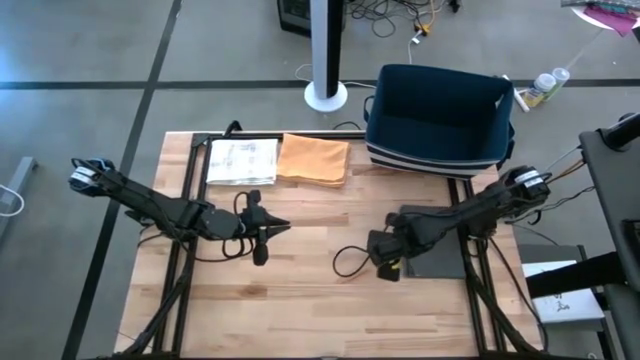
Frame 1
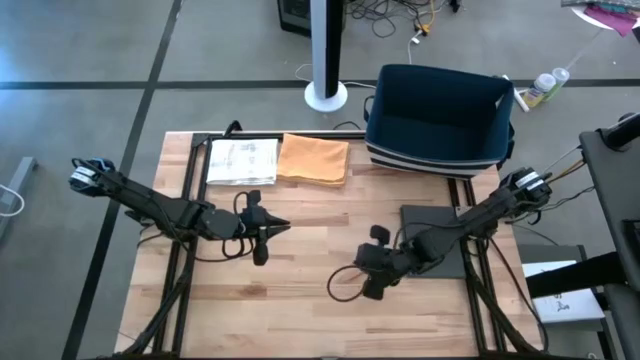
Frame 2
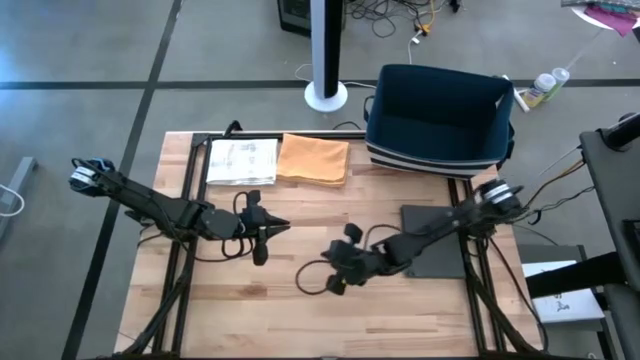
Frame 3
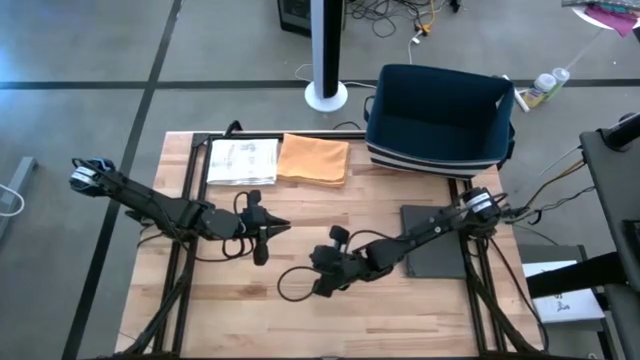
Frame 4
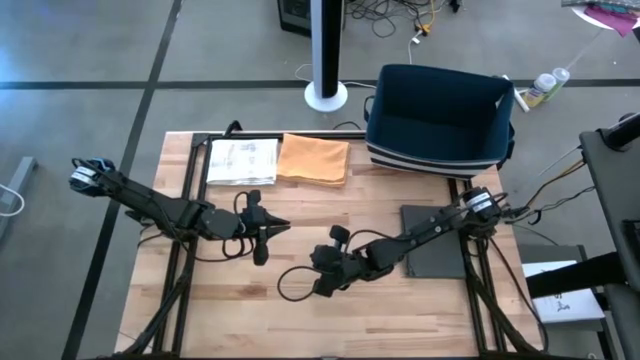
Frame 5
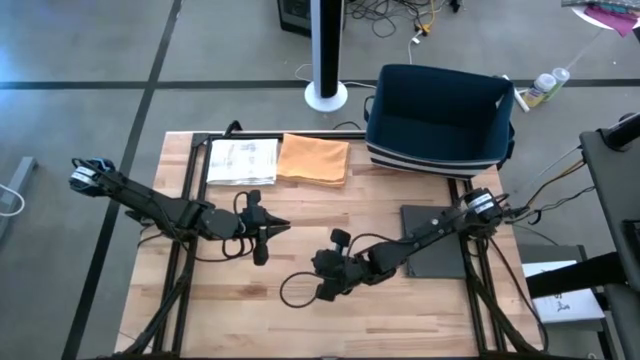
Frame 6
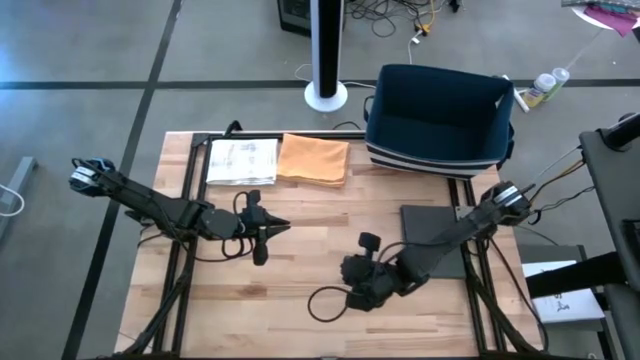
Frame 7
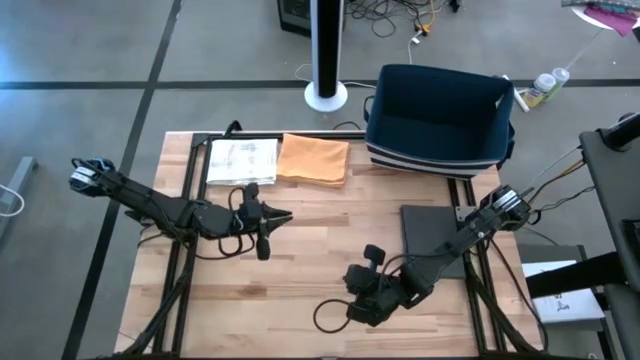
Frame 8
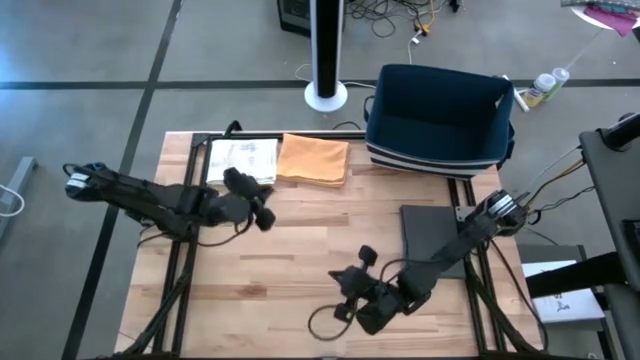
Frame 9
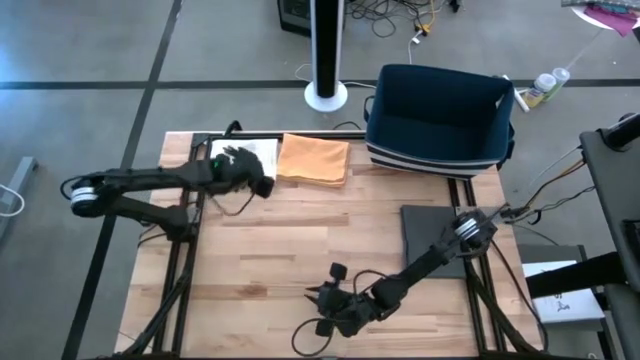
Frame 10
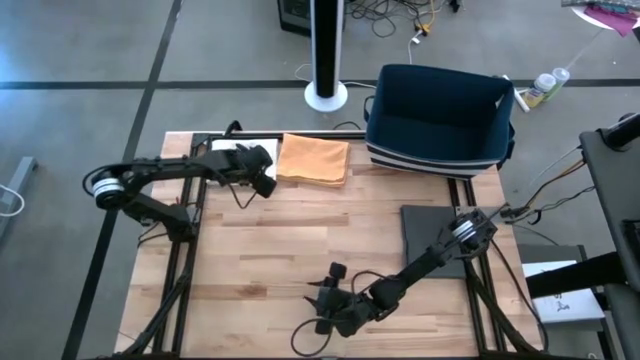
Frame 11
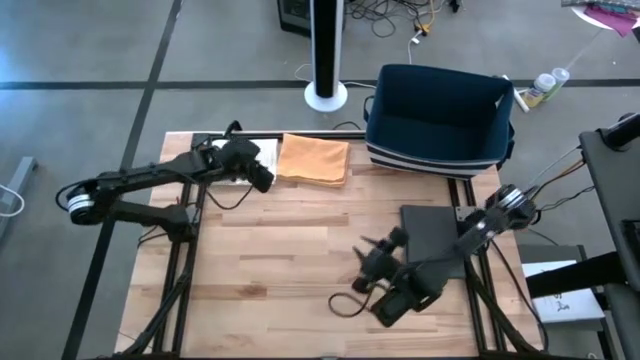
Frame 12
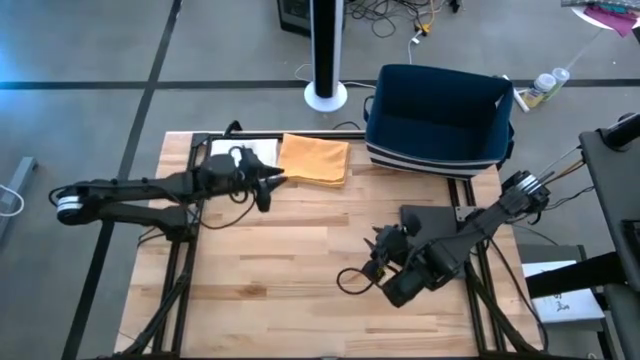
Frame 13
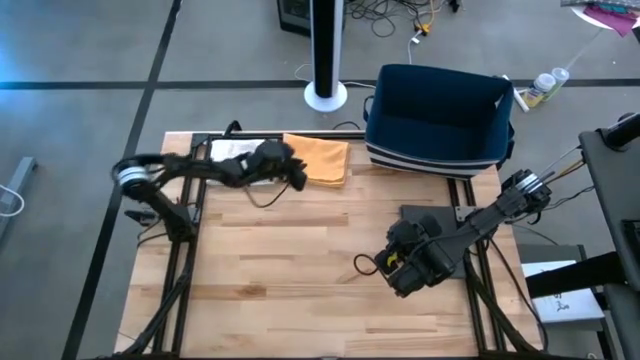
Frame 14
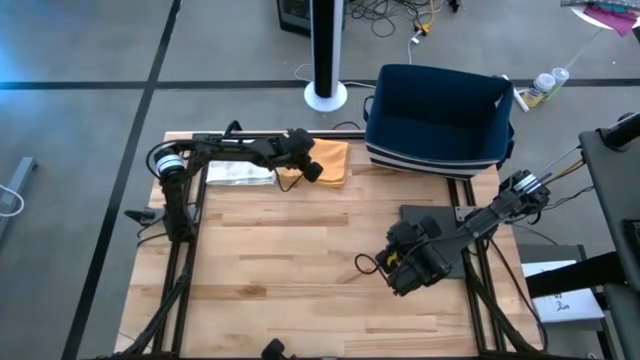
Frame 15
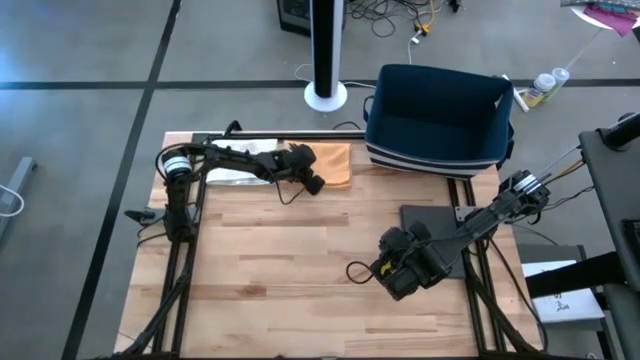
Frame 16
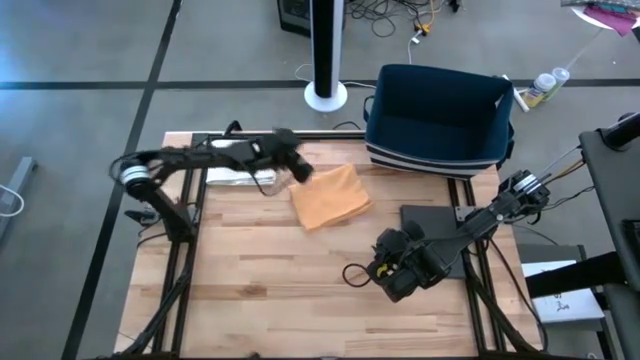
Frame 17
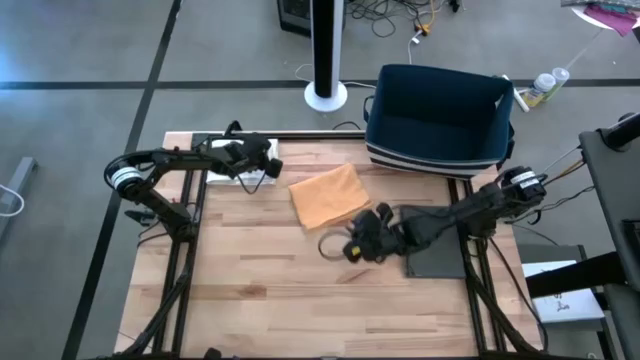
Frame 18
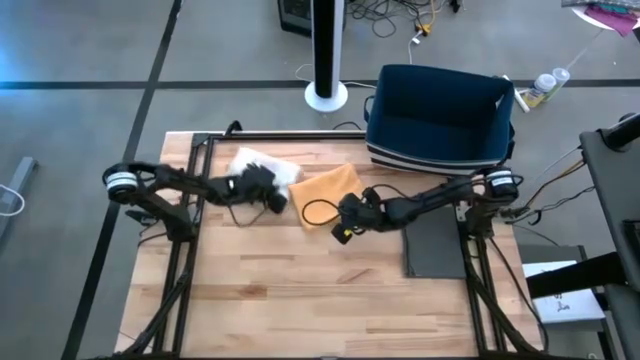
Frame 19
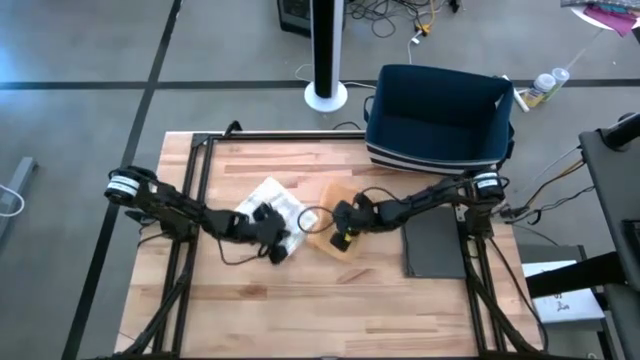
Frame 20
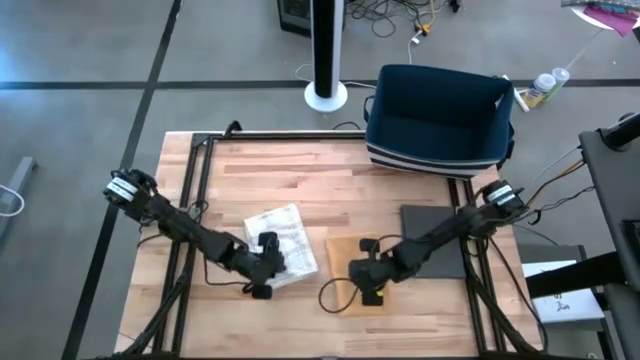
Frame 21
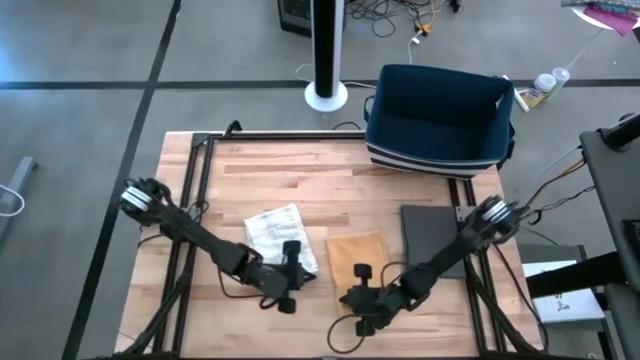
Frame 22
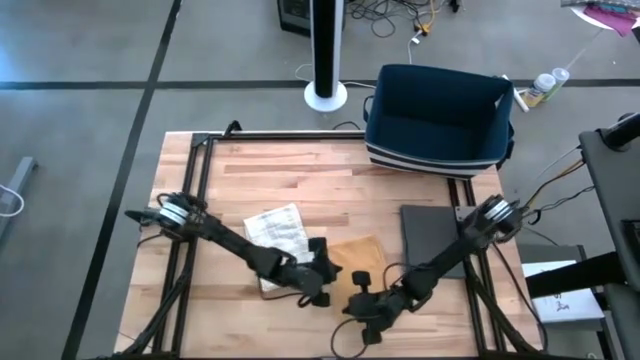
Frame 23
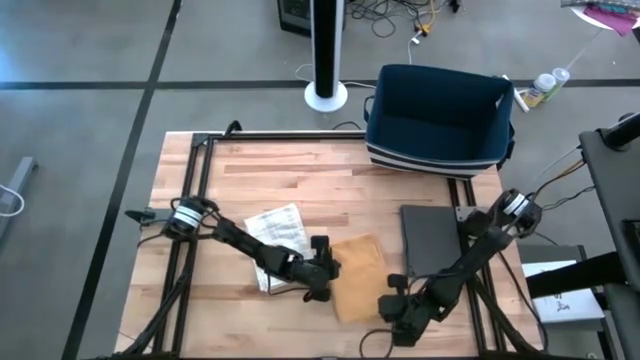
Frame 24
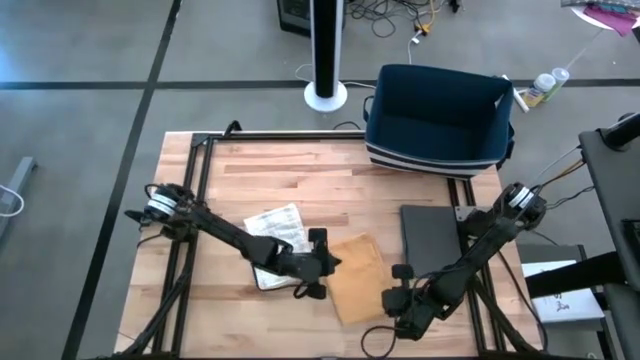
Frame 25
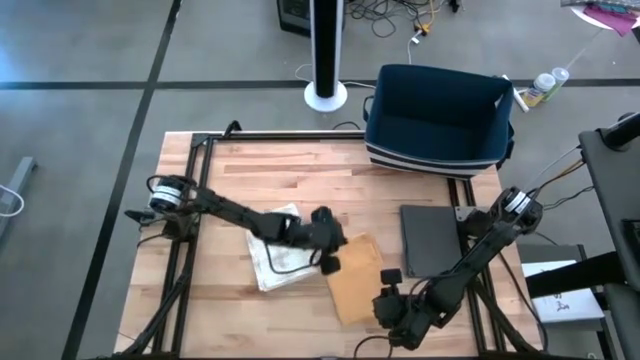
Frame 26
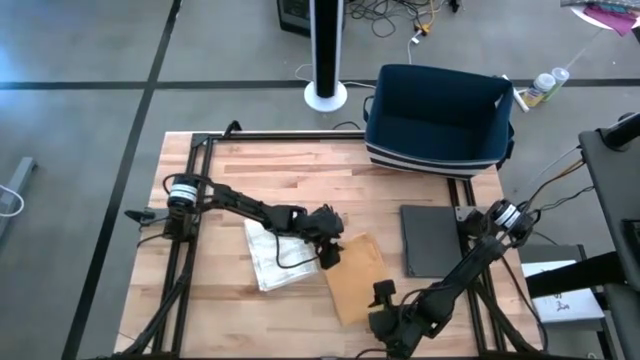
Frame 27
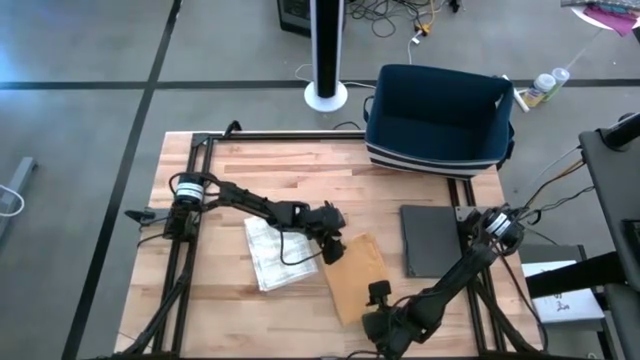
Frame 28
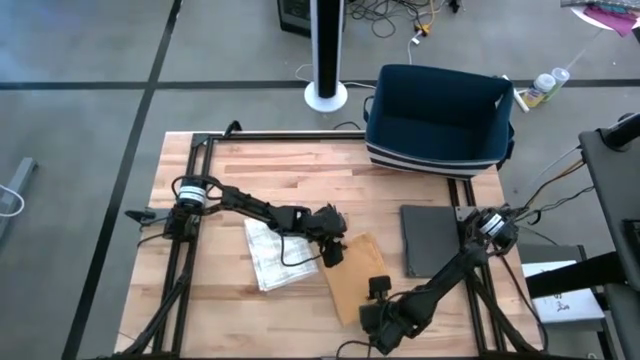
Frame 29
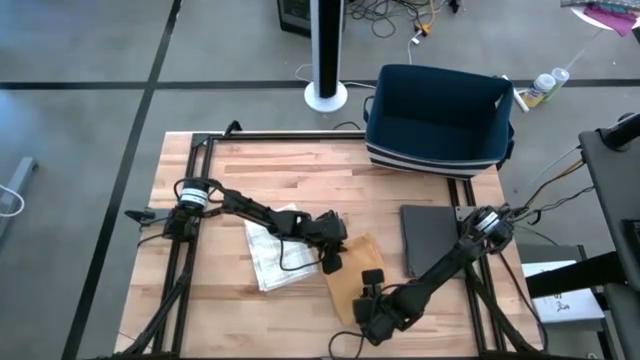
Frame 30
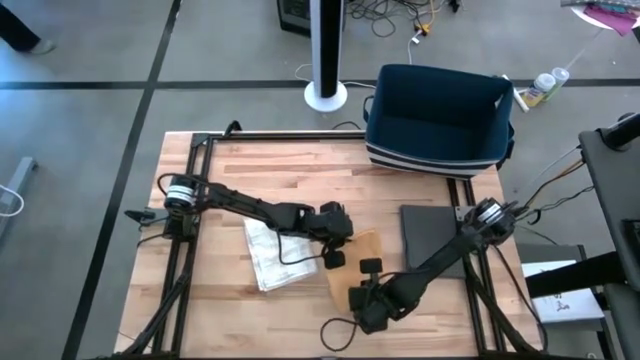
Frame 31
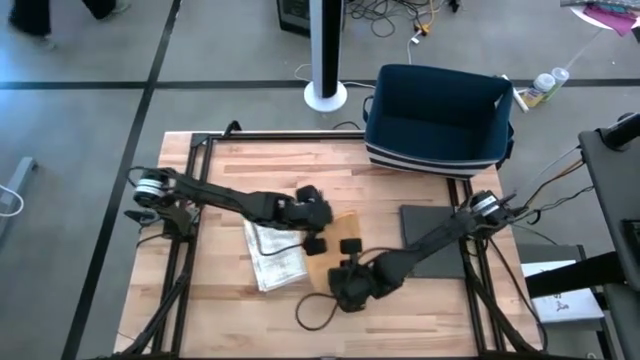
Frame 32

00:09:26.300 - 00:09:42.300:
Task: Fold towel
Stack the yellow towel on the white towel

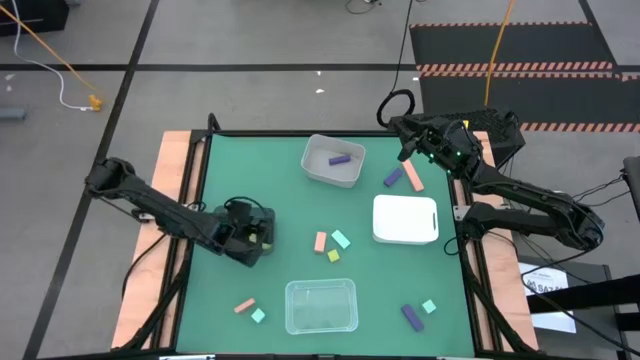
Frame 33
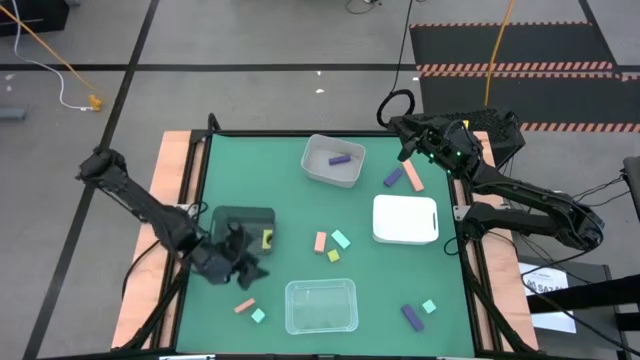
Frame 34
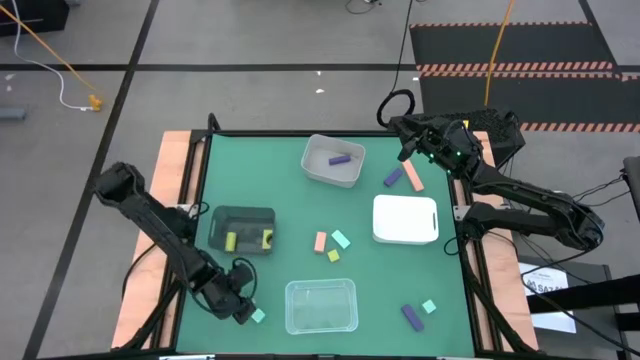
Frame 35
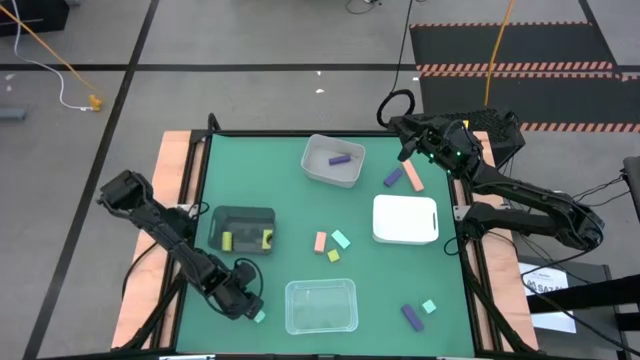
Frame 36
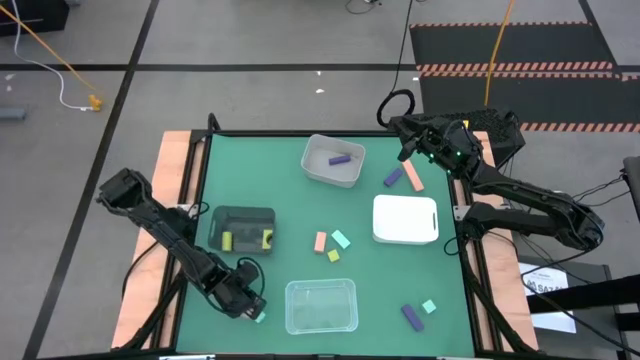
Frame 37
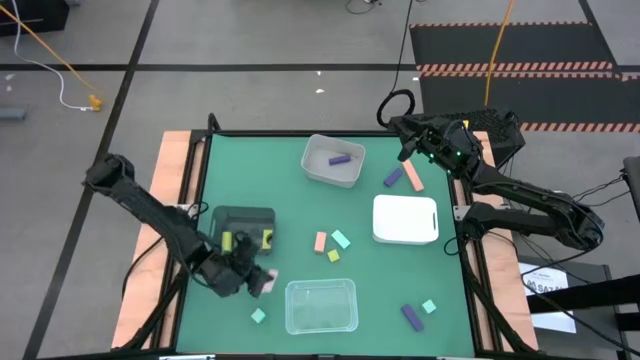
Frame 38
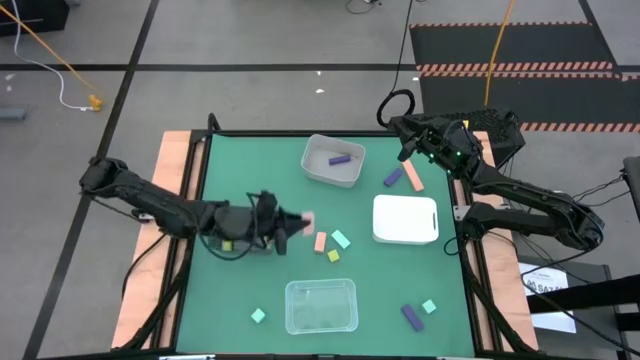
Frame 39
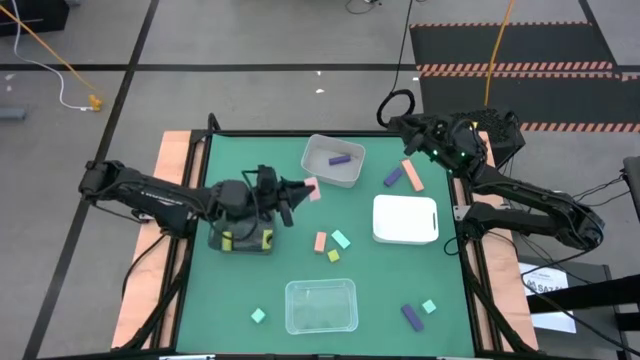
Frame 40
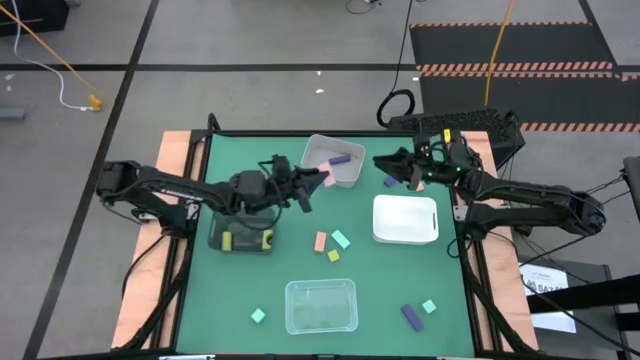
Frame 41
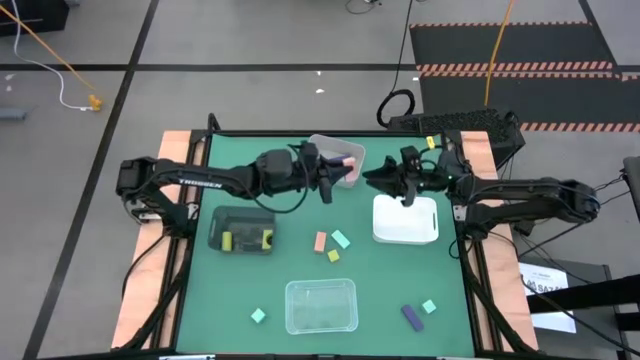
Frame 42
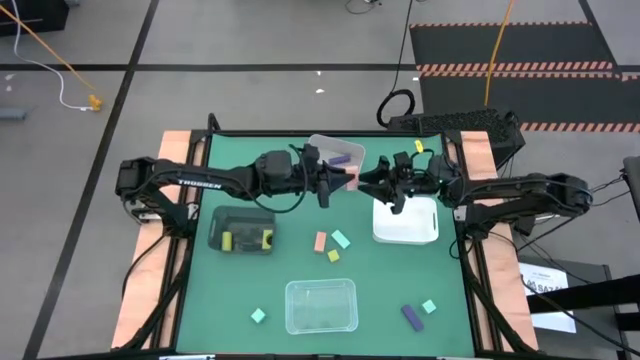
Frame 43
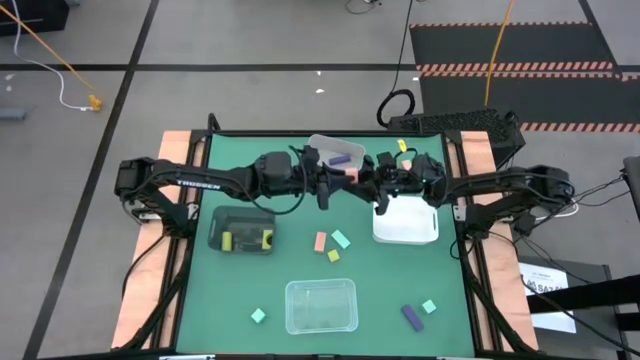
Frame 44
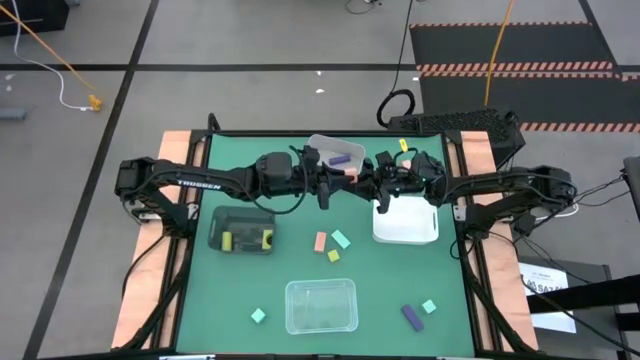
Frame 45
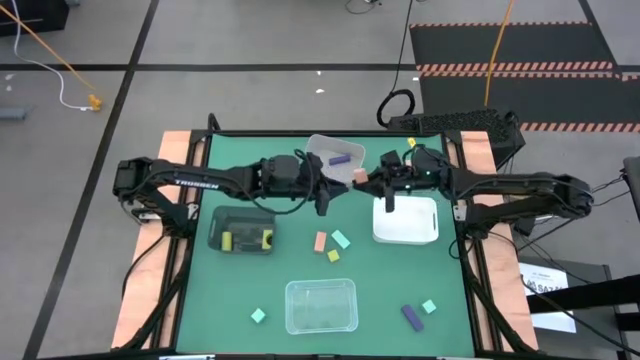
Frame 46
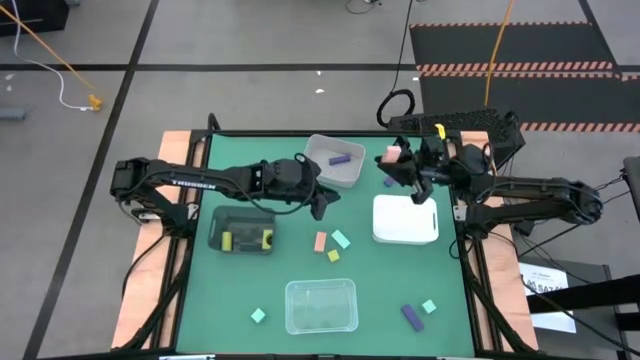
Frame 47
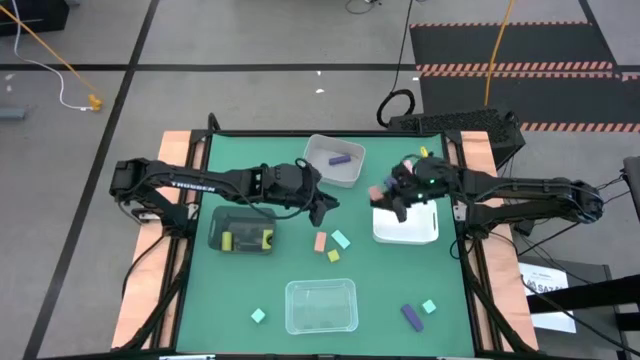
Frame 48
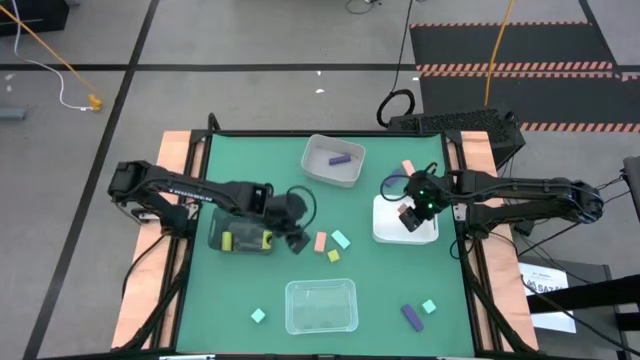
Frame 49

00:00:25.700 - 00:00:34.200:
Task: Sort & place blocks by color
Put the left pink block into the white bin
